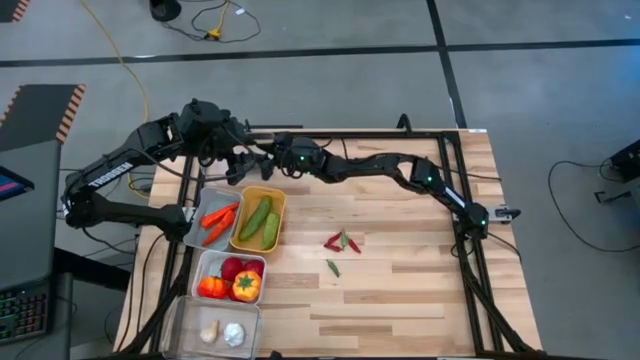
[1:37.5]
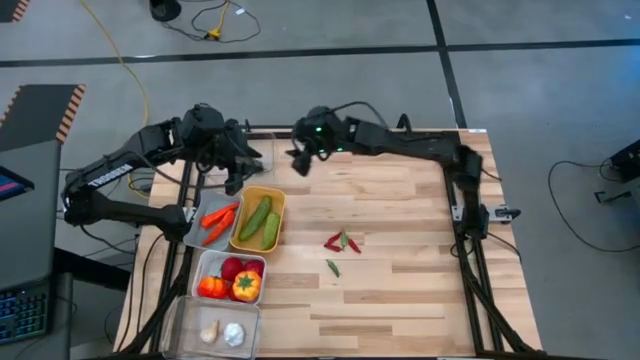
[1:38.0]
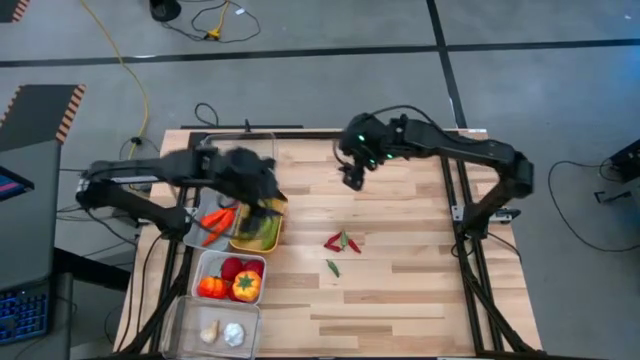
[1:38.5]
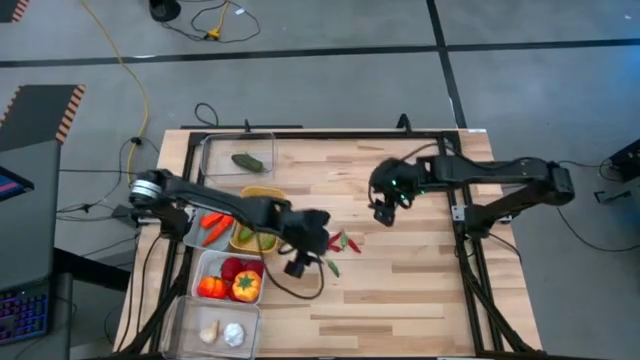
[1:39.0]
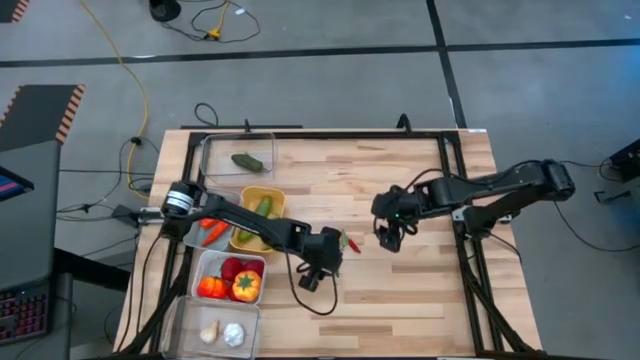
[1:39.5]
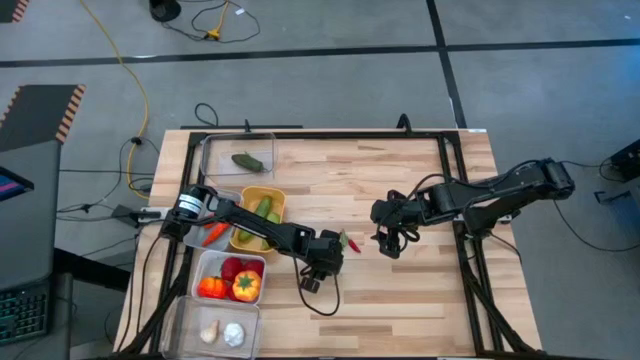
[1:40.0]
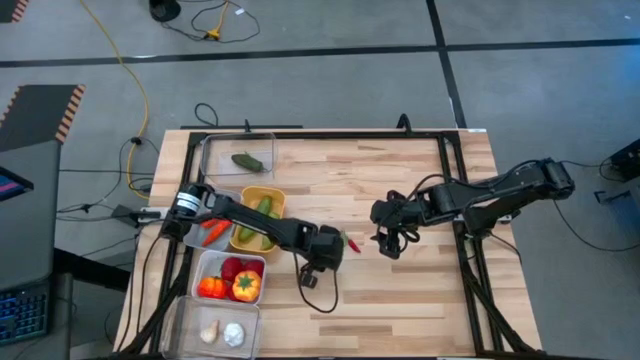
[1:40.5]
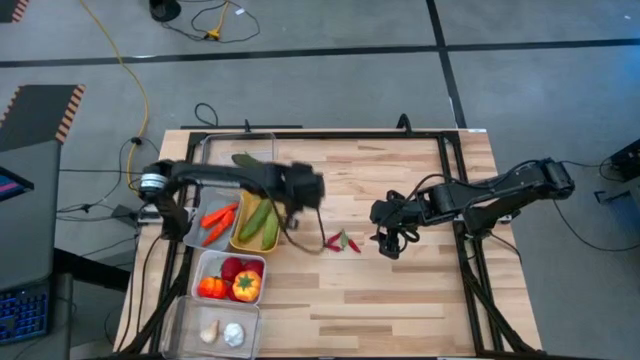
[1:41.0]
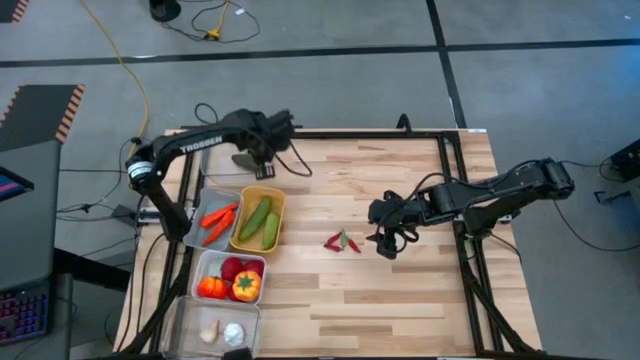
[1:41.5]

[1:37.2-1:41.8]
Task: Sort produce into baskets
Put the bottom left pepper into the top transparent bin

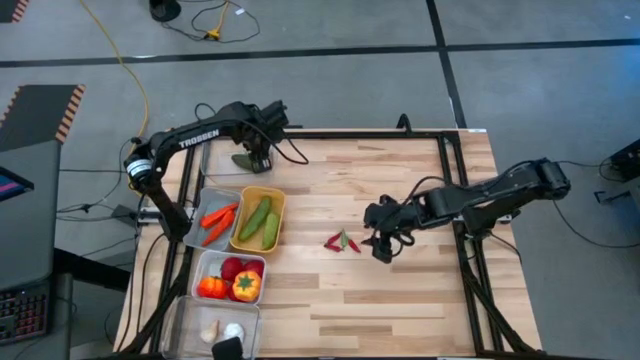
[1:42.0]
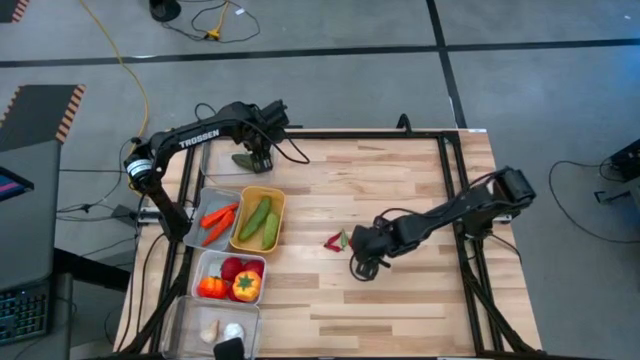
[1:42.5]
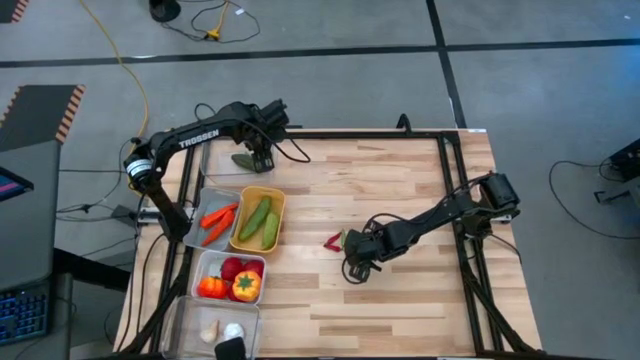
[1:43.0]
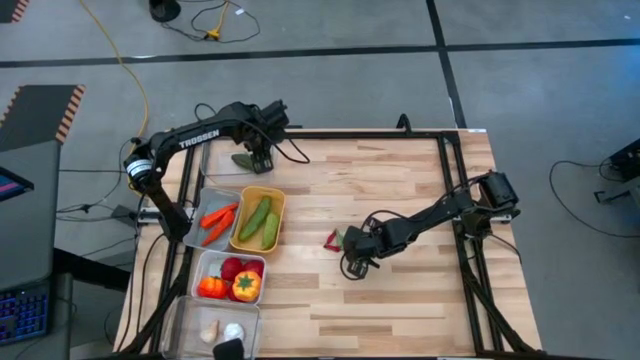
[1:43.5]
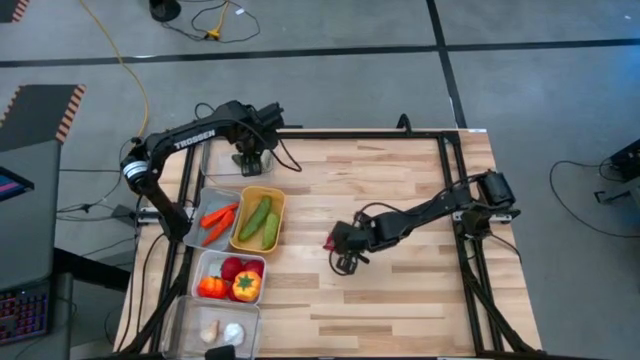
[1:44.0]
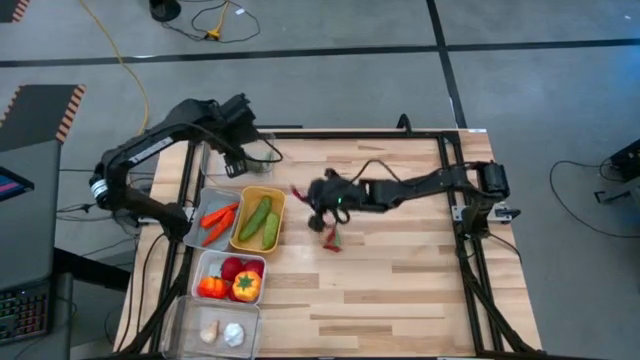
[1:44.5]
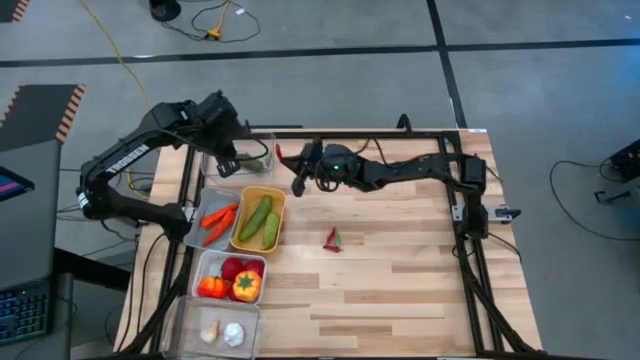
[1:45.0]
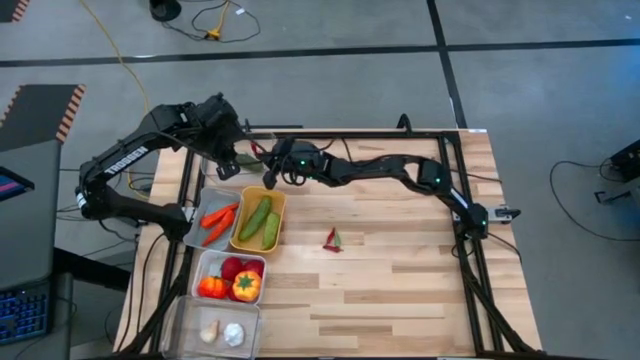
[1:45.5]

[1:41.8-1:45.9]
Put the middle right pepper into the transparent bin

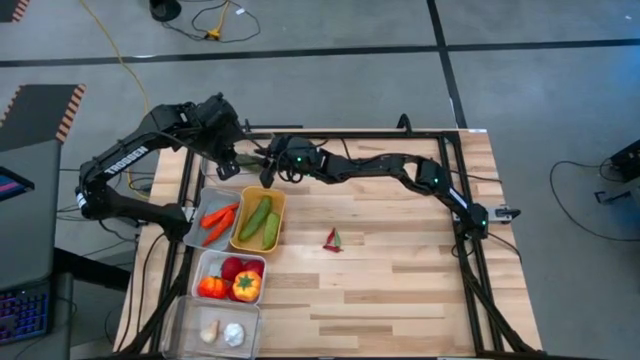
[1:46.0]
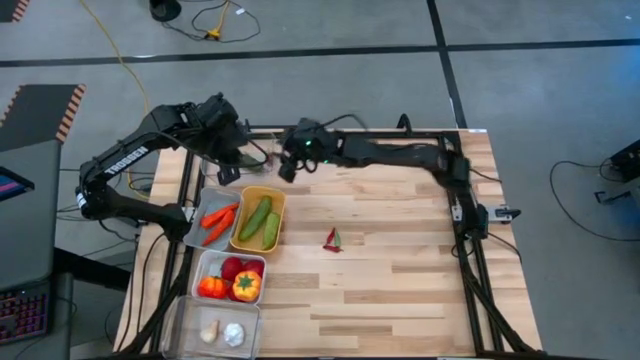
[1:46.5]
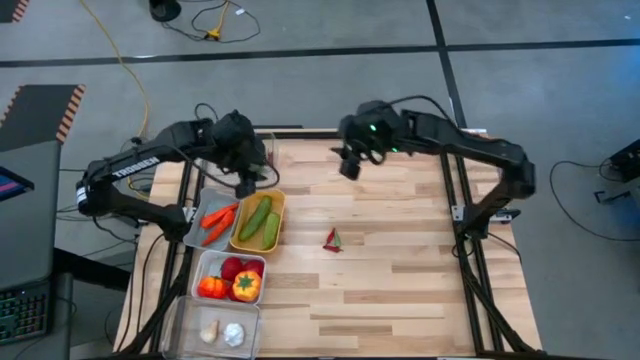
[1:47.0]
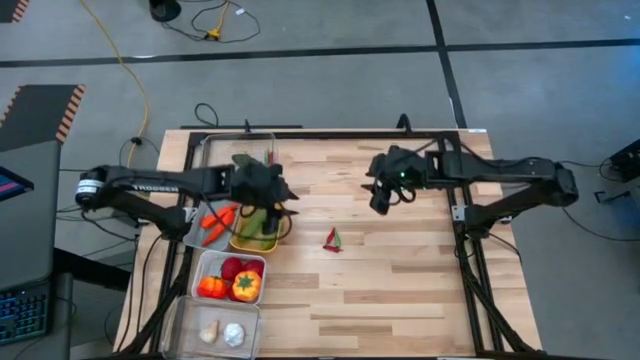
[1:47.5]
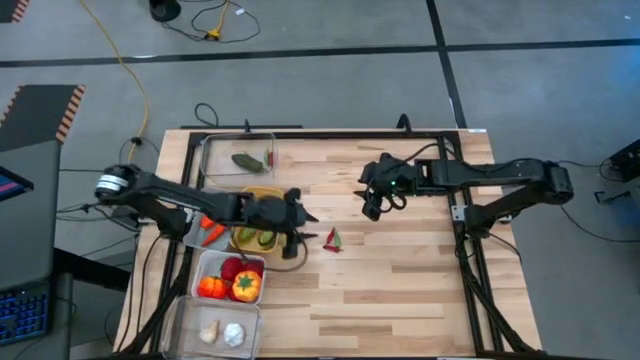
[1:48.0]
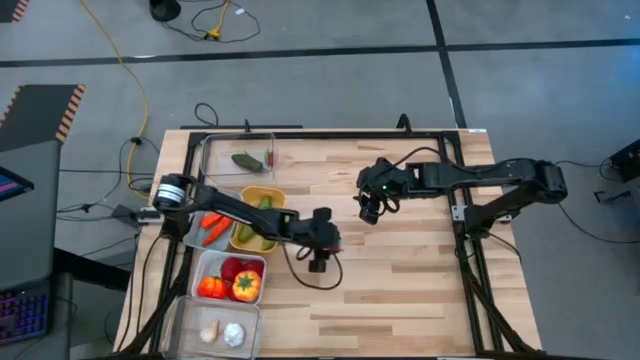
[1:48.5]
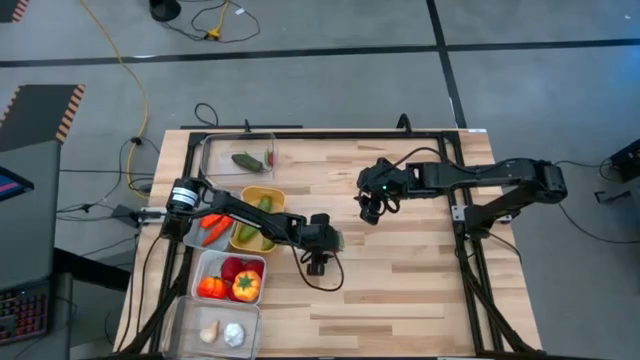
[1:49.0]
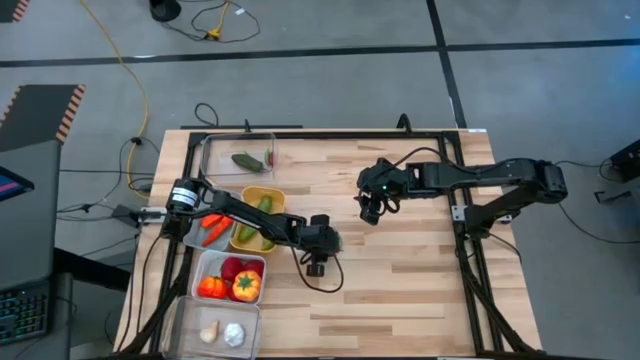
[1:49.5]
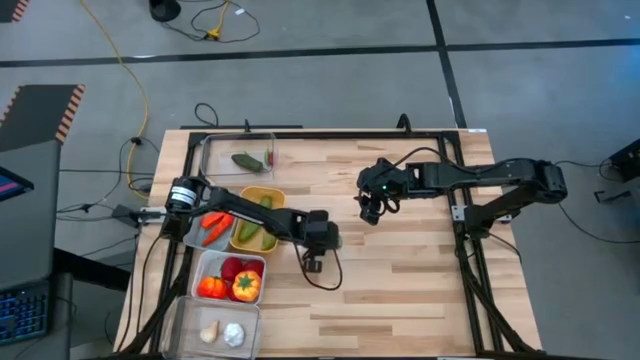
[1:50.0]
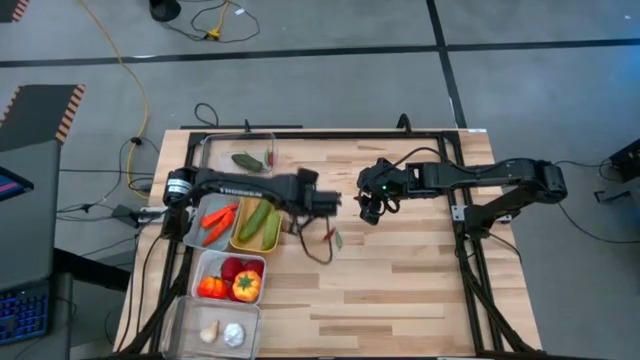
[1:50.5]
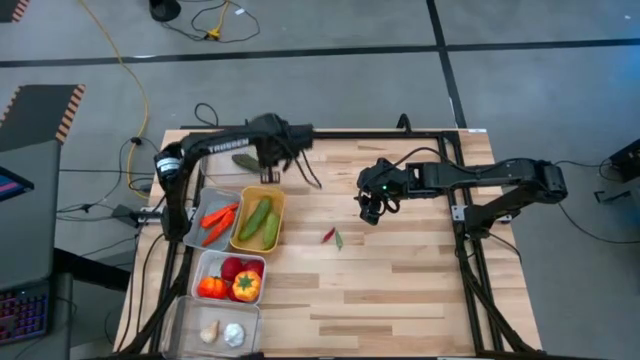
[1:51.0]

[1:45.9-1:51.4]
Put the bottom center pepper into the top transparent bin

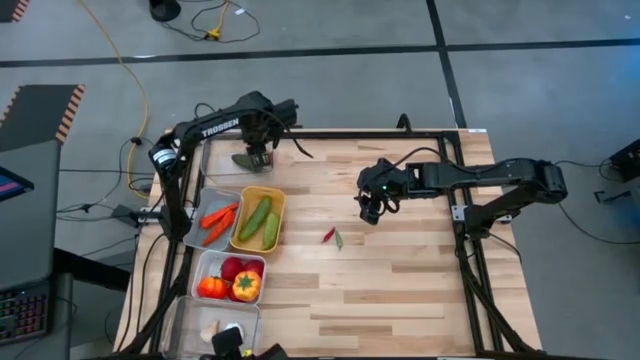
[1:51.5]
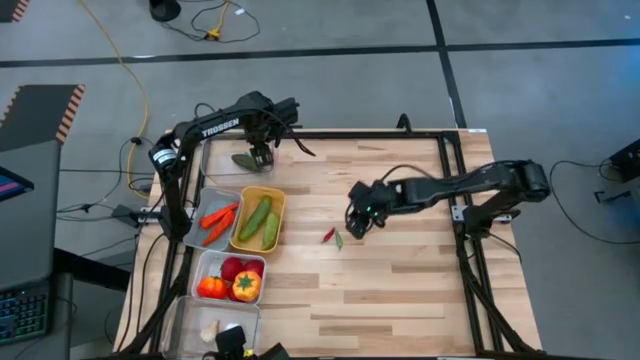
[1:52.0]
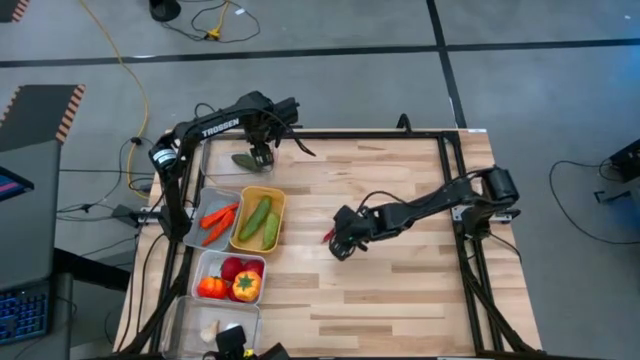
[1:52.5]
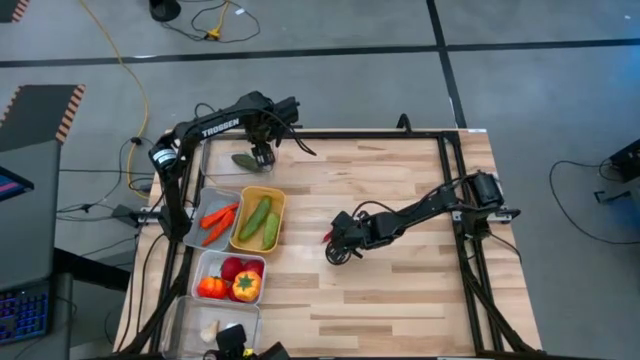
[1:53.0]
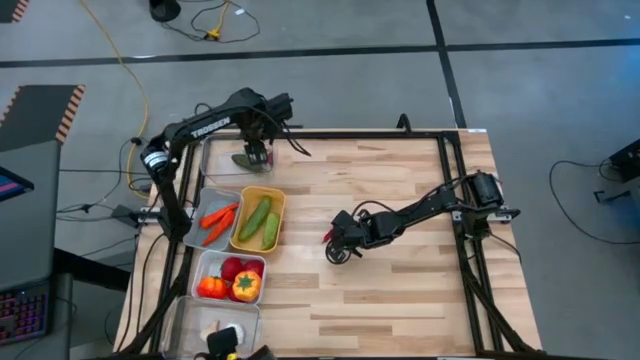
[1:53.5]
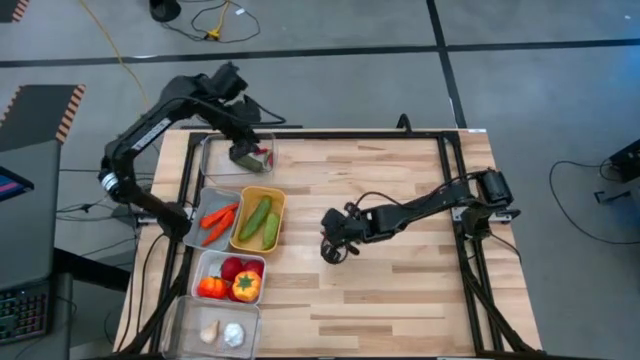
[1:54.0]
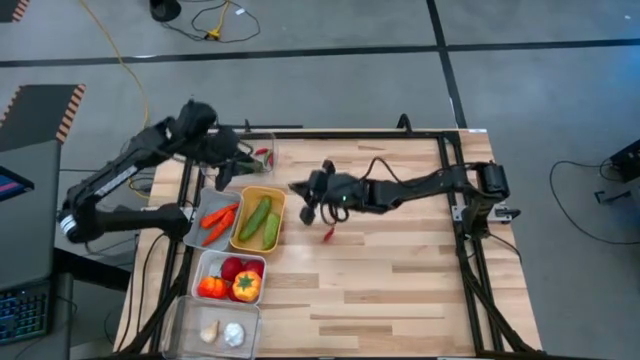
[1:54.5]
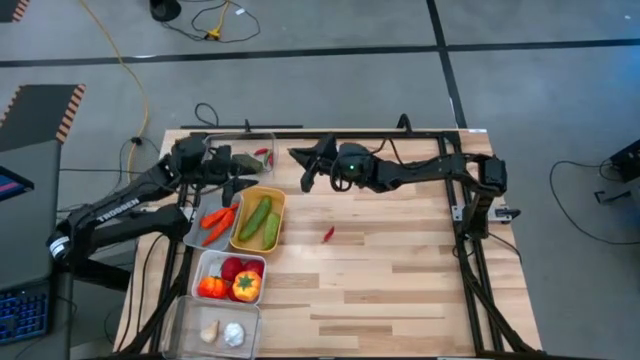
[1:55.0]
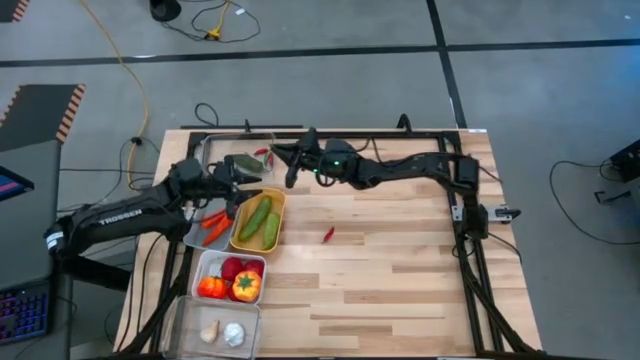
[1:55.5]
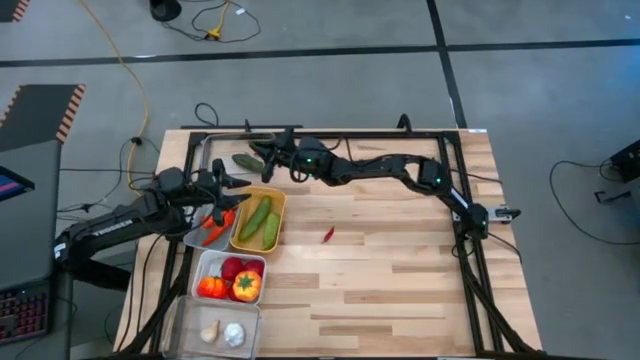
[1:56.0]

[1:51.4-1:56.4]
Put the right pepper into the top transparent bin

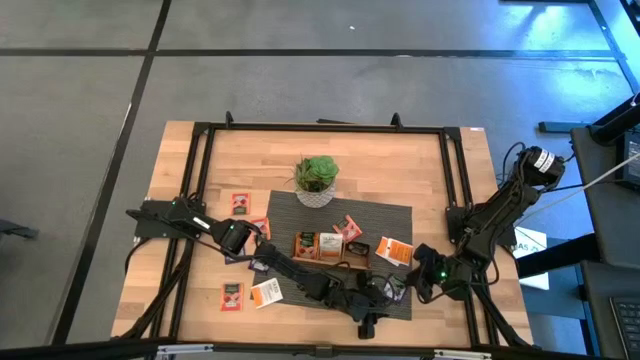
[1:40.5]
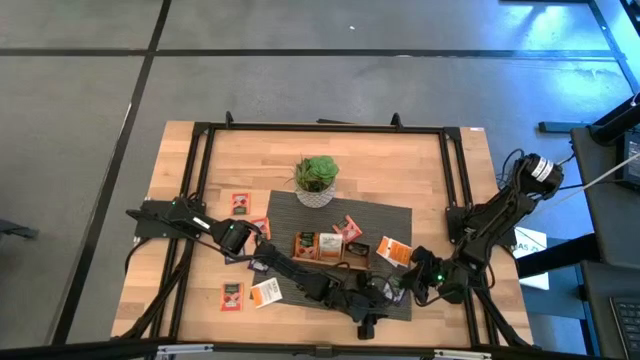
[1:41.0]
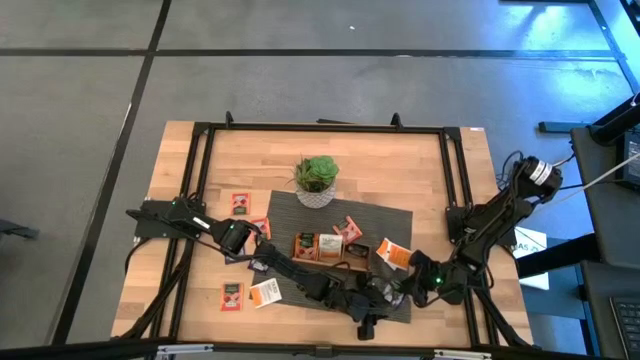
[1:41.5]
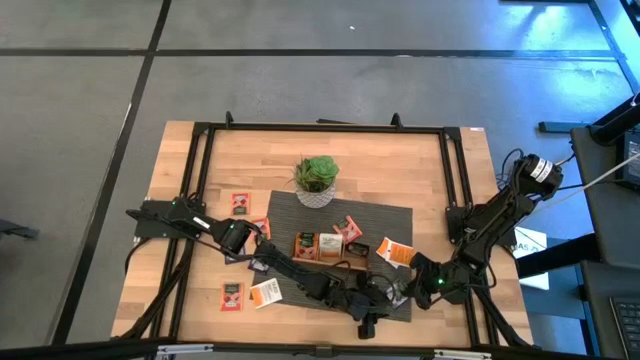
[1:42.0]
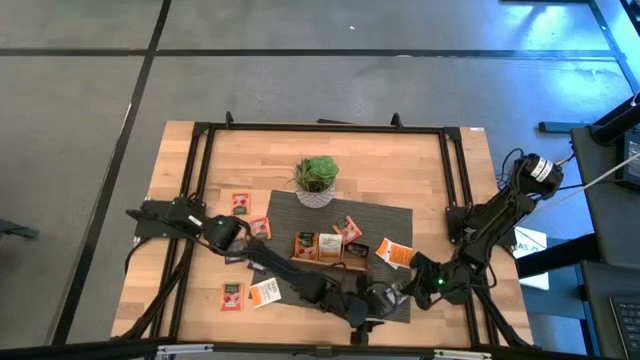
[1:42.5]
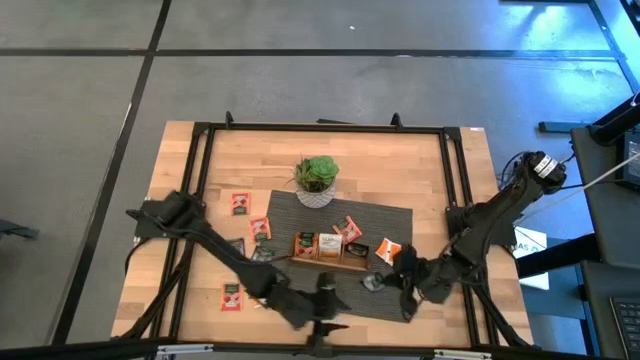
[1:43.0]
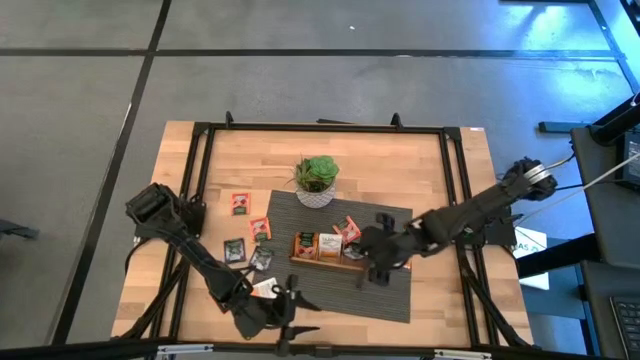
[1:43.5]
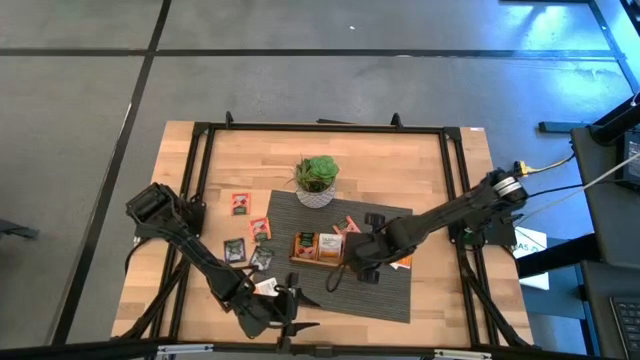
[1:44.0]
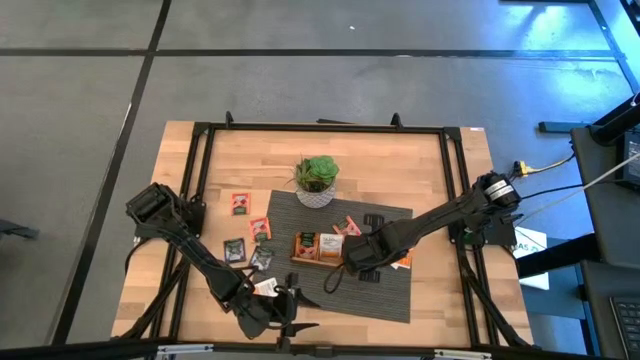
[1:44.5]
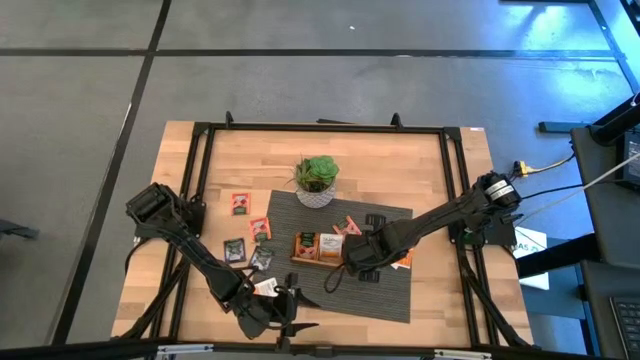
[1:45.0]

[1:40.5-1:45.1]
Task: Pick & Place Tea
Put the violet tea bag into the right section of the wooden organizer
